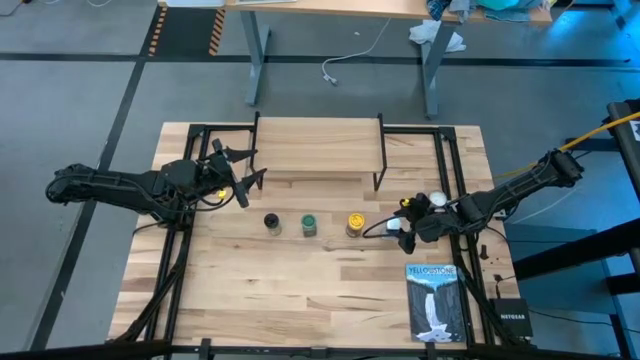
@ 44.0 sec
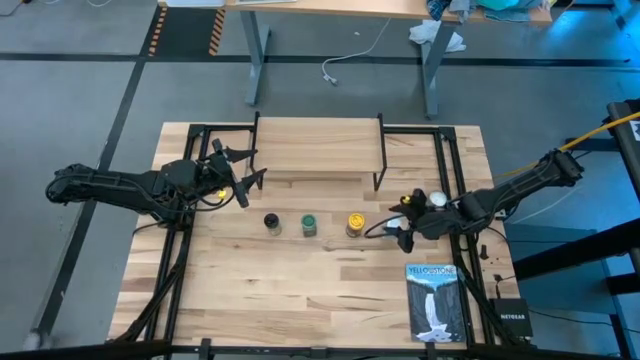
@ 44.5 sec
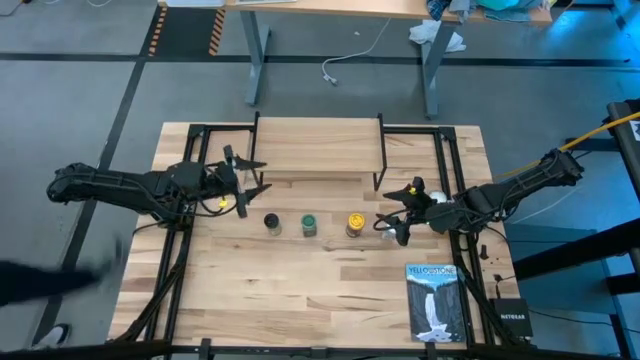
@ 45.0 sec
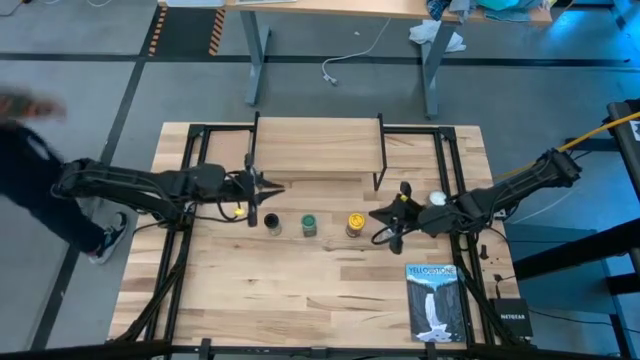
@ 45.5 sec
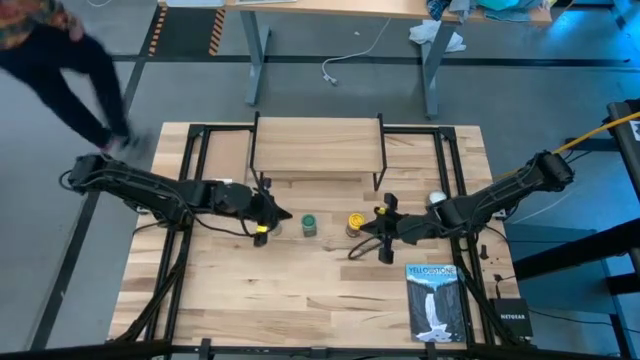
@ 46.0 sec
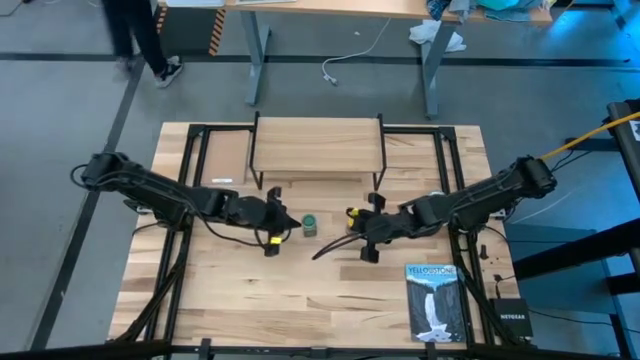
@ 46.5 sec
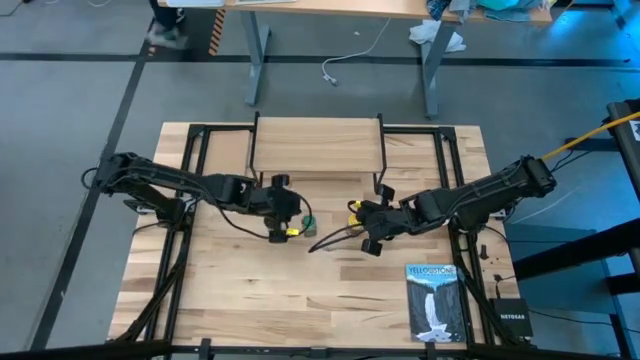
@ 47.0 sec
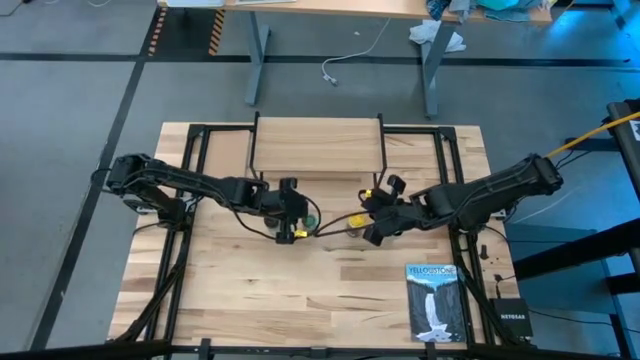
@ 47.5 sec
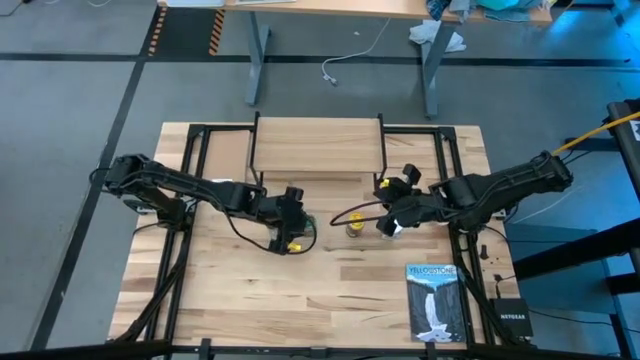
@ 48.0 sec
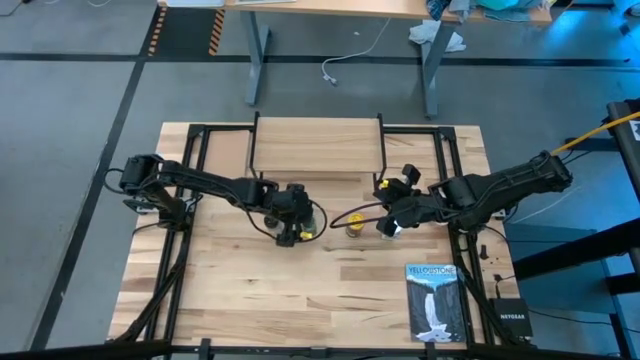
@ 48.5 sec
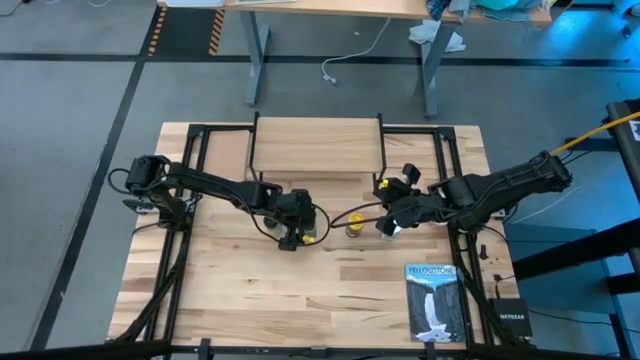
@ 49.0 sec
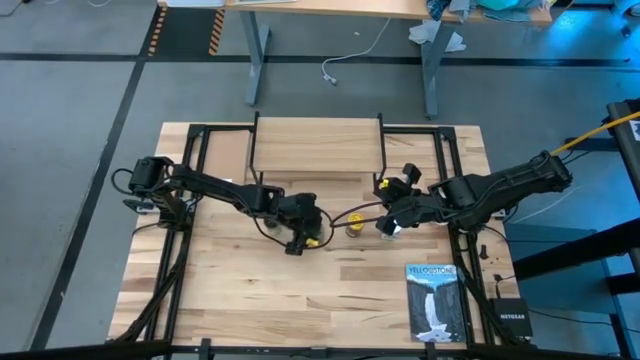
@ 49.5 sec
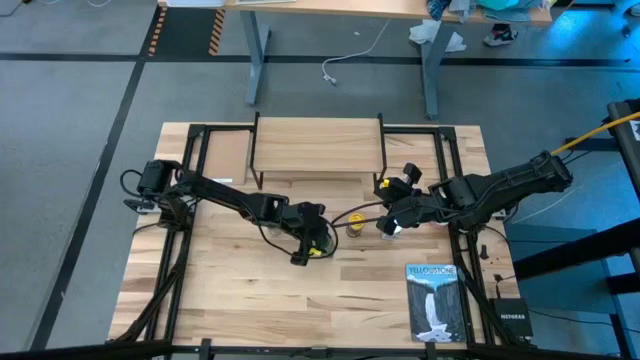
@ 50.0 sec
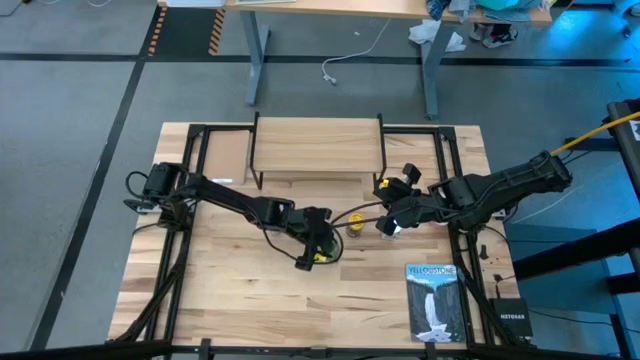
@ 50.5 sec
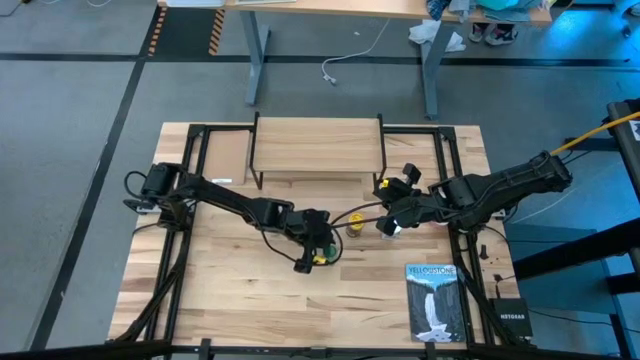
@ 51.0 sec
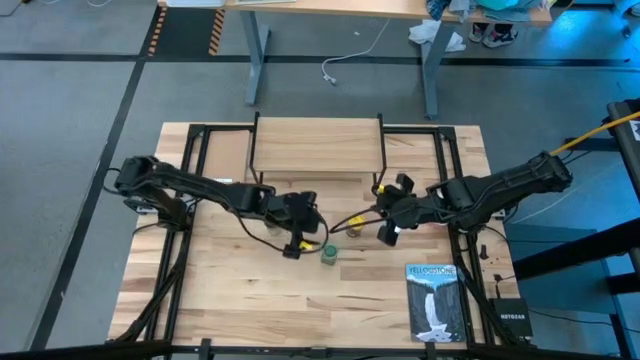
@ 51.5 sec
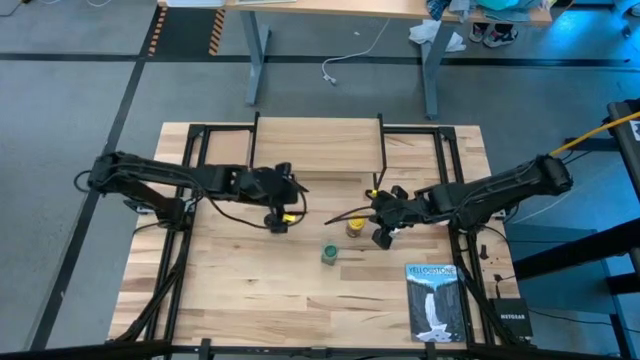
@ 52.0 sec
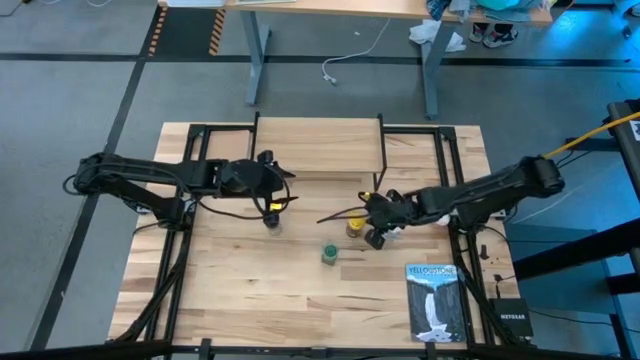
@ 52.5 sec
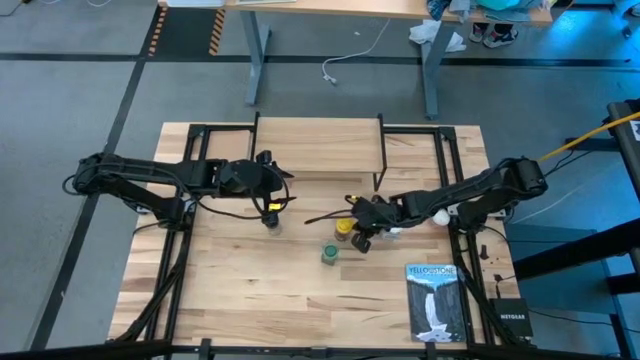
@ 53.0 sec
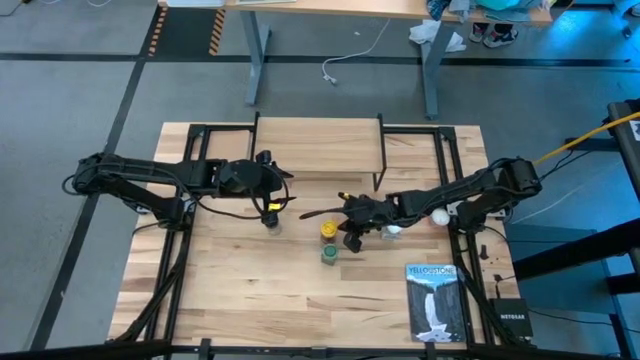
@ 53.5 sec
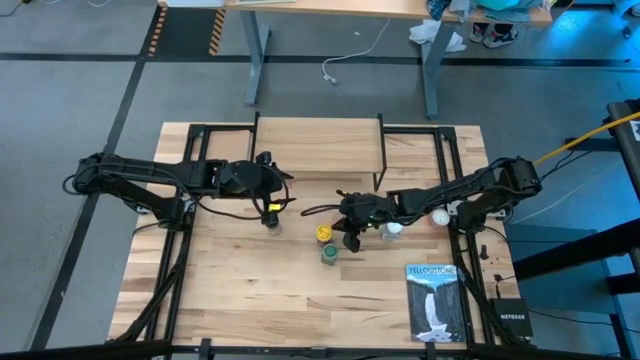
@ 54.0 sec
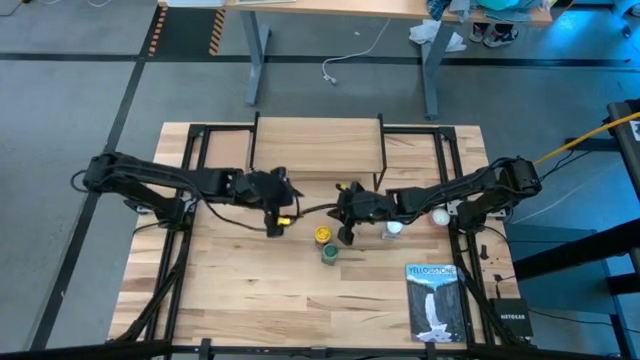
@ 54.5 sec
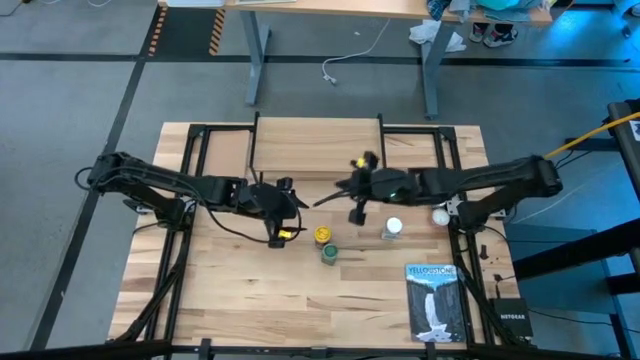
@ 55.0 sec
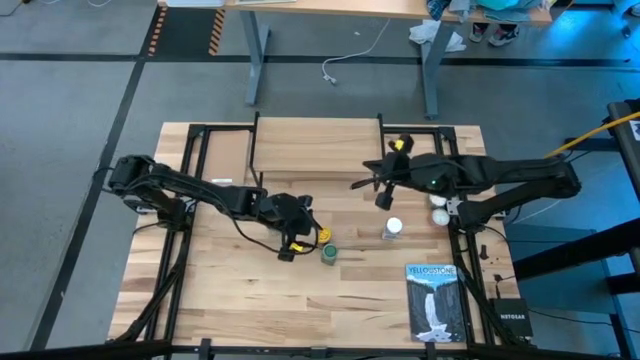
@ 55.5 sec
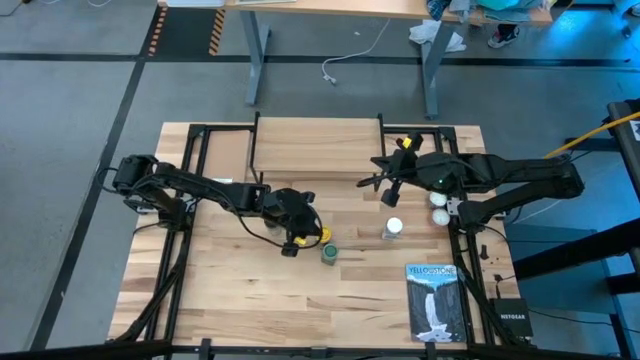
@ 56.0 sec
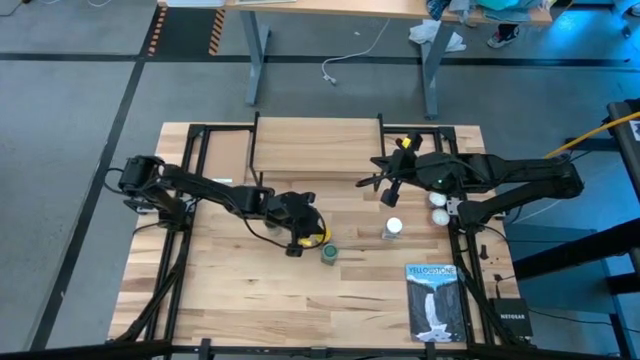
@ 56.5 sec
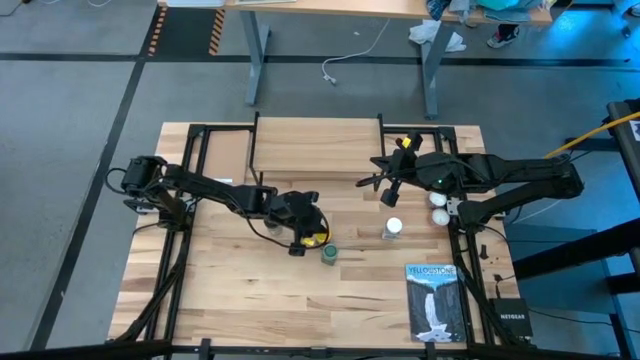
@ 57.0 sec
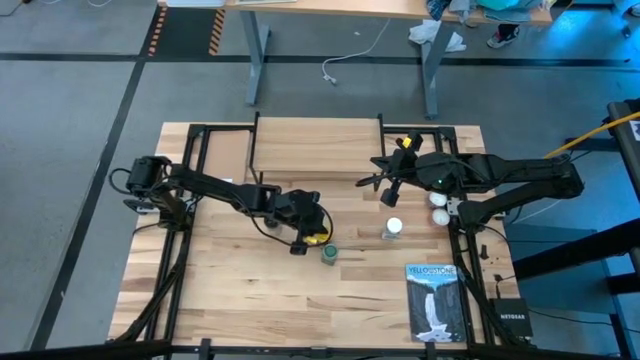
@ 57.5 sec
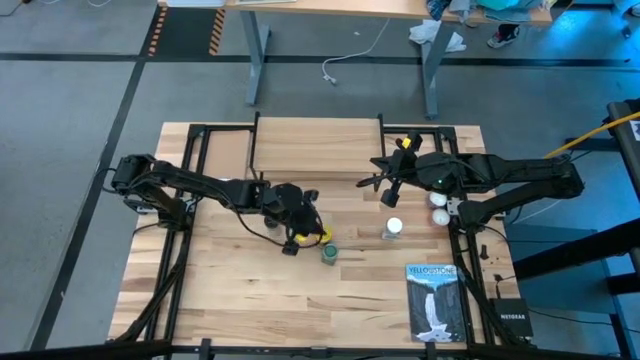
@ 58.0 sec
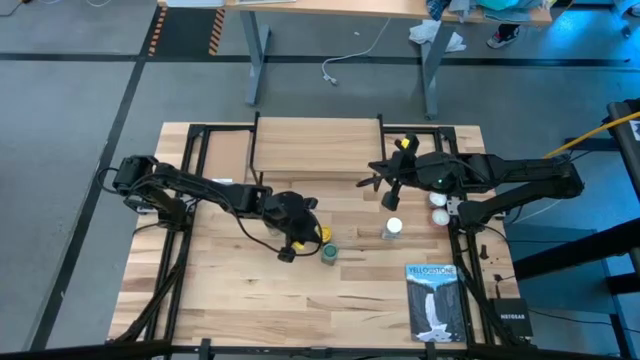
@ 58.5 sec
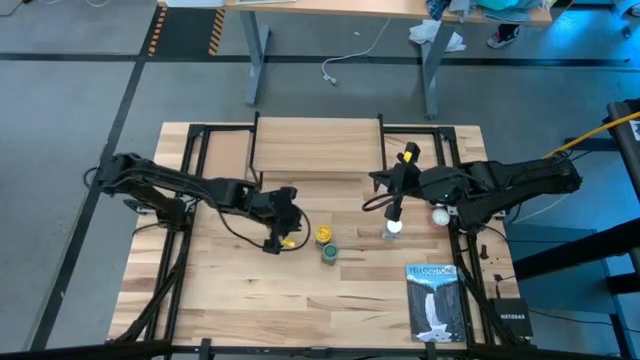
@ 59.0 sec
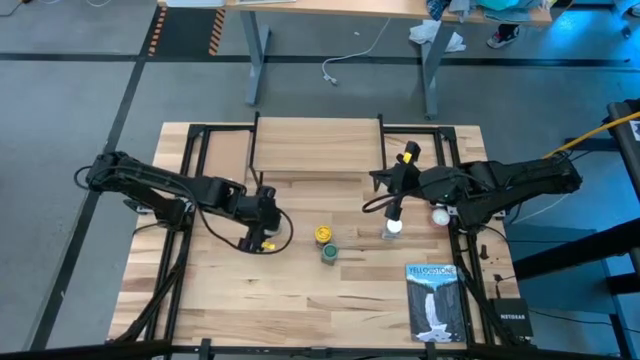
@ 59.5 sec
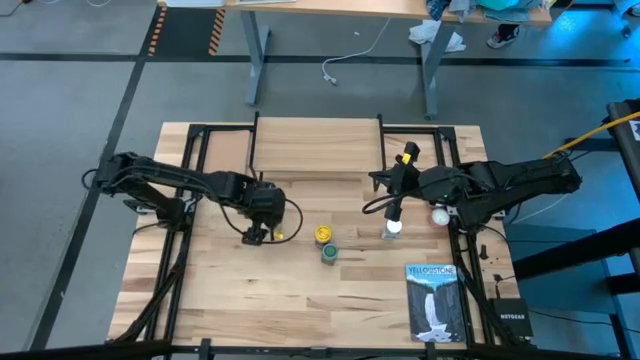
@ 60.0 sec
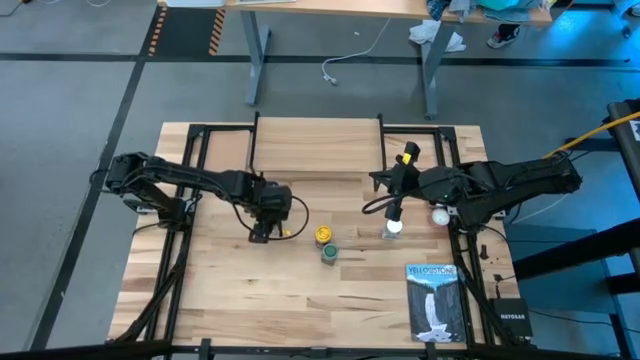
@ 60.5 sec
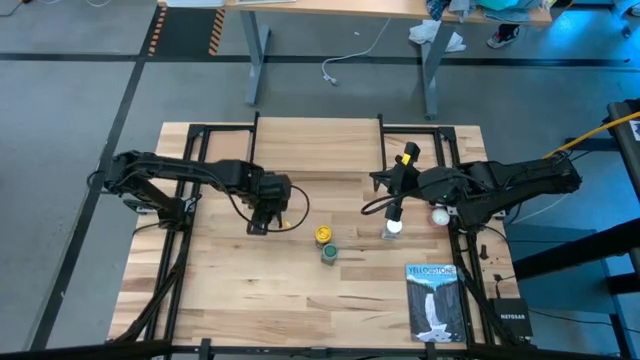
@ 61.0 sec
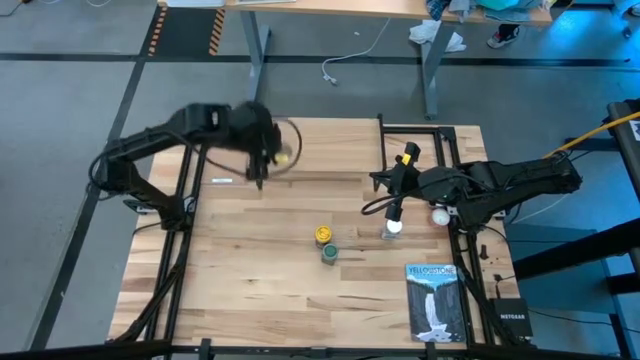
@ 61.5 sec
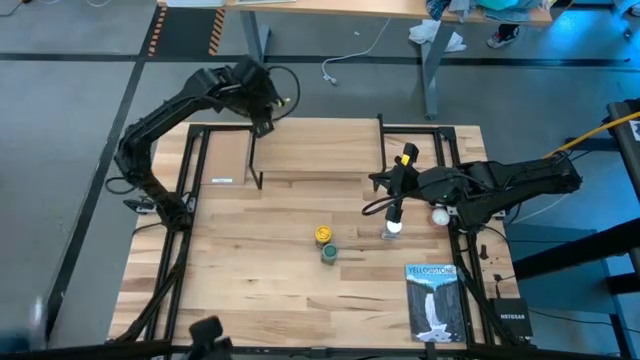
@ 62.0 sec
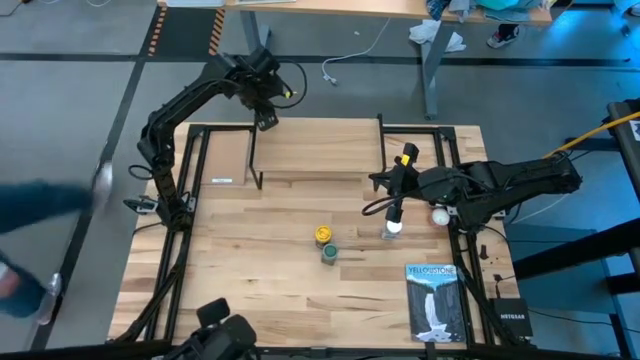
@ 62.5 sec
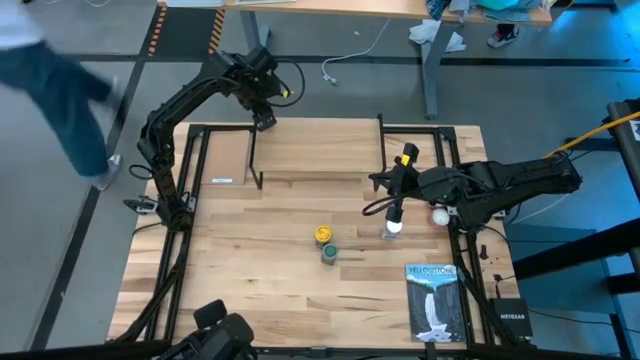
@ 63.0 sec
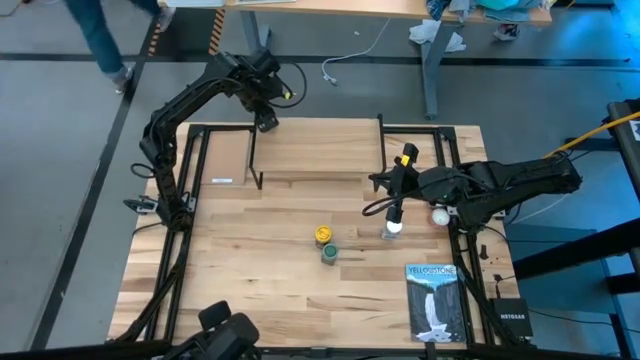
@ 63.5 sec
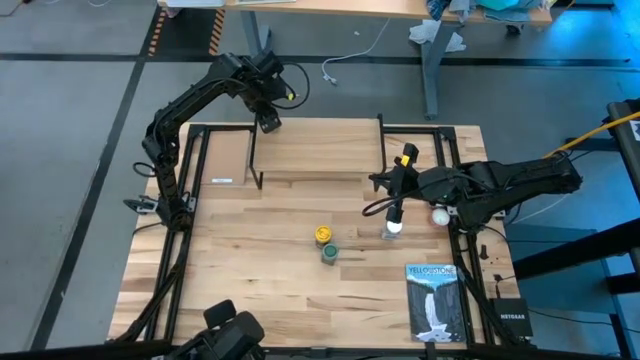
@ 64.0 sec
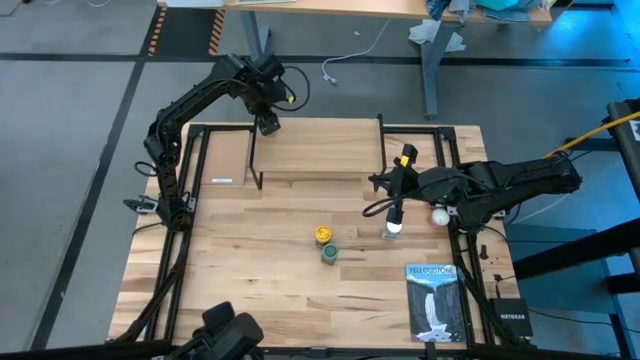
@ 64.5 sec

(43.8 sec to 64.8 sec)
Task: Shelf spices
Put the black seasoning bottle on the shelf

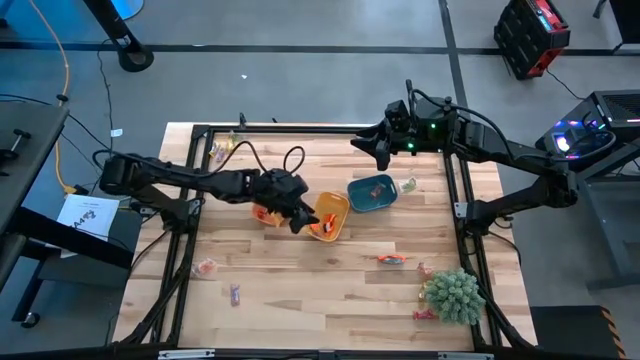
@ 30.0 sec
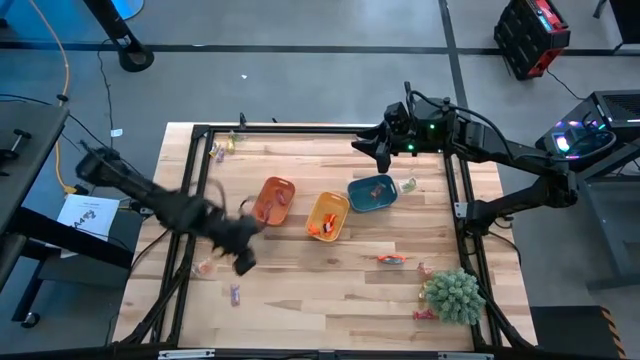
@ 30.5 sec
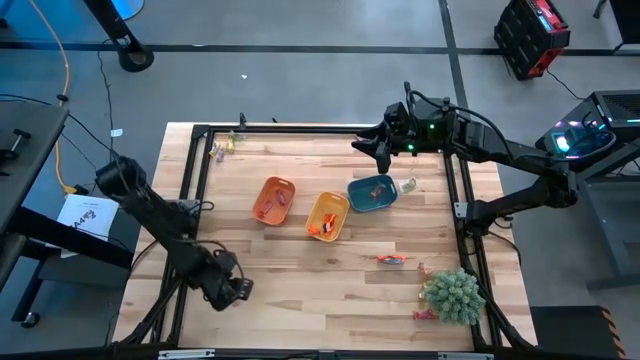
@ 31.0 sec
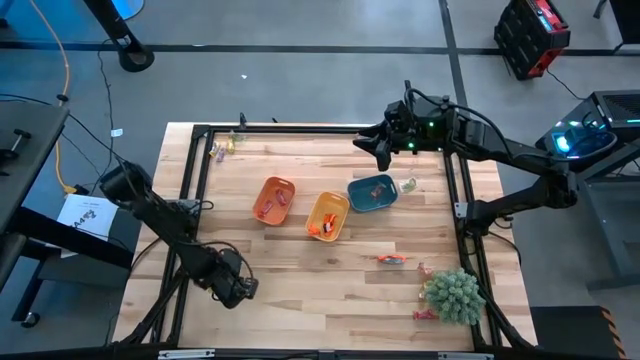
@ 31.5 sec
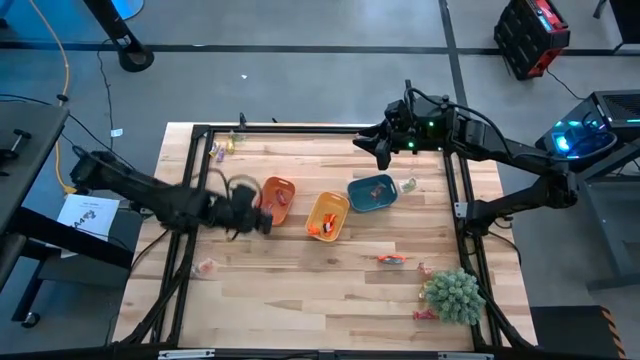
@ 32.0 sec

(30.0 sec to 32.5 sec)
Task: Sort candy
Put the purple candy into the orange bin
